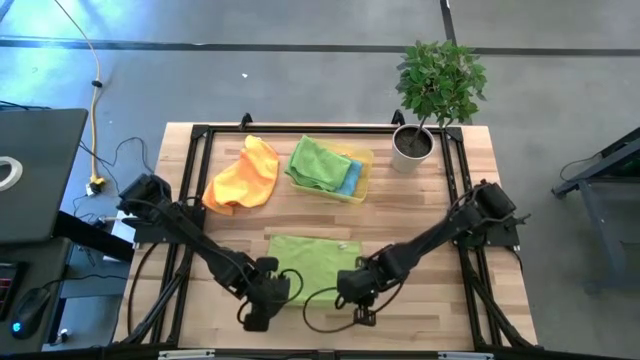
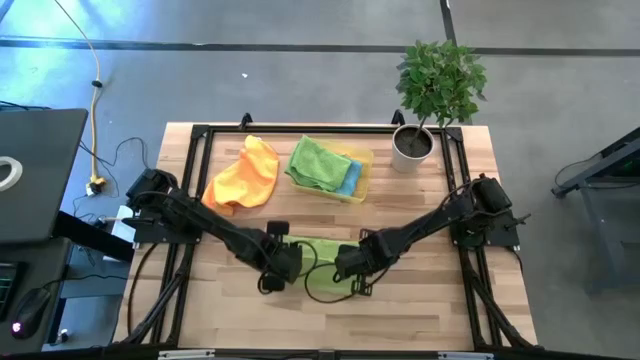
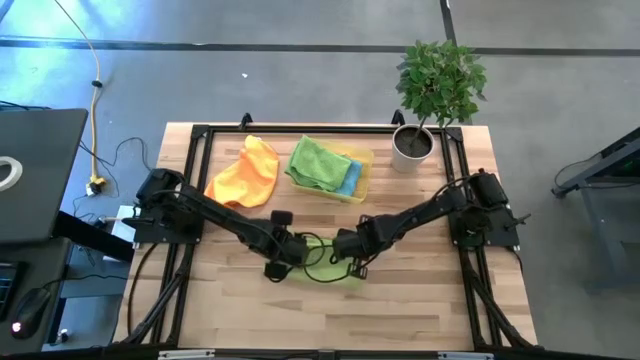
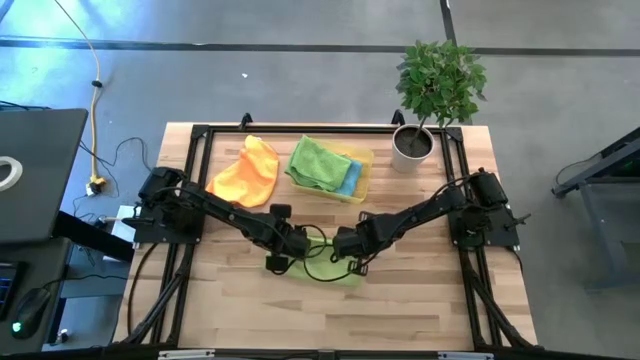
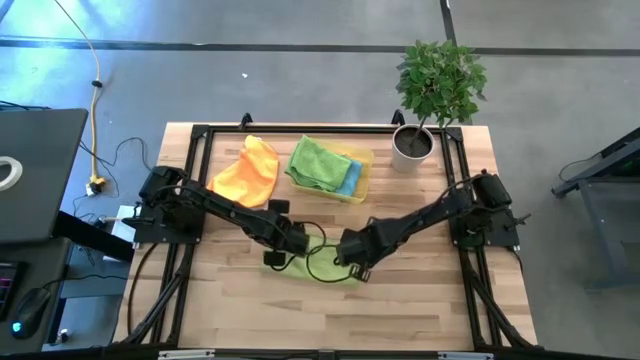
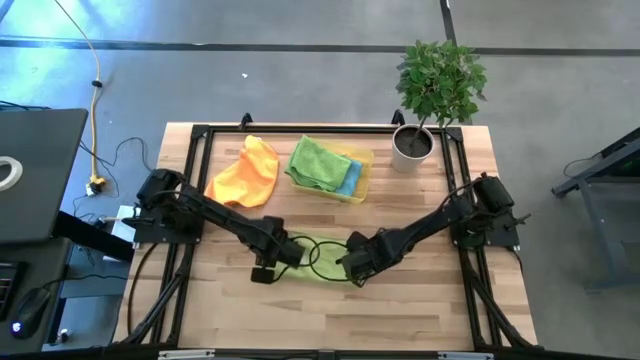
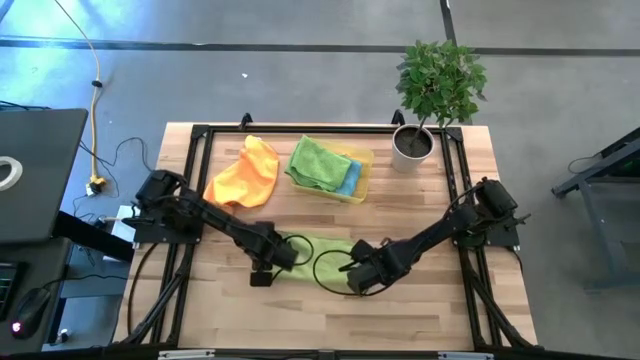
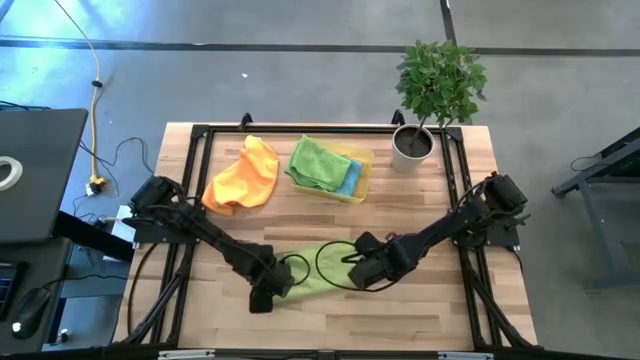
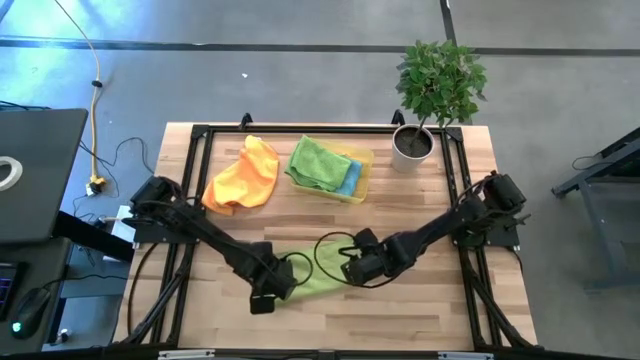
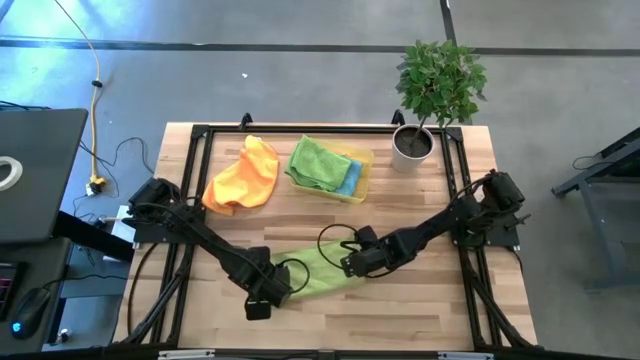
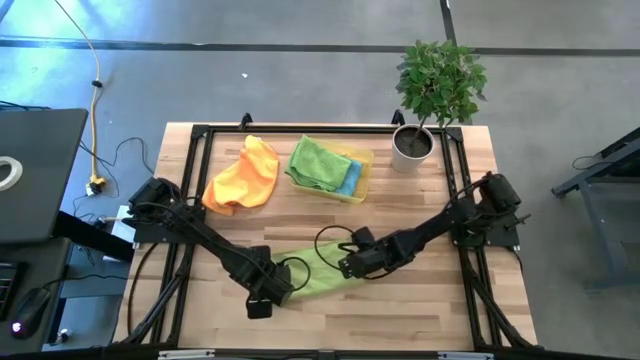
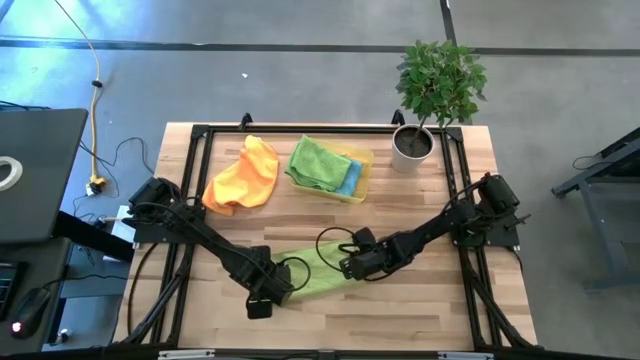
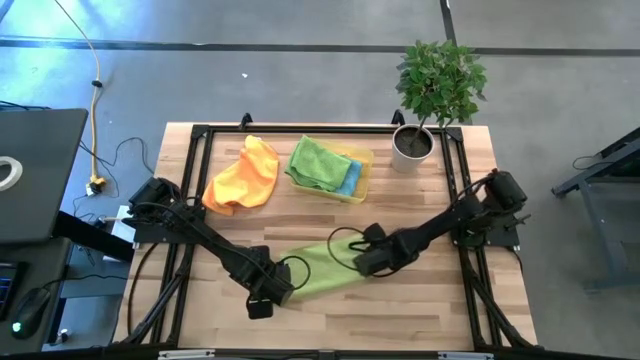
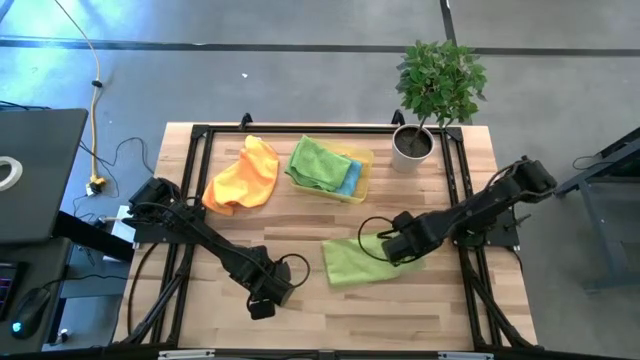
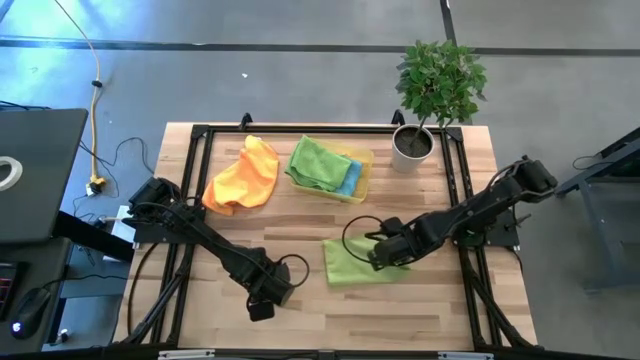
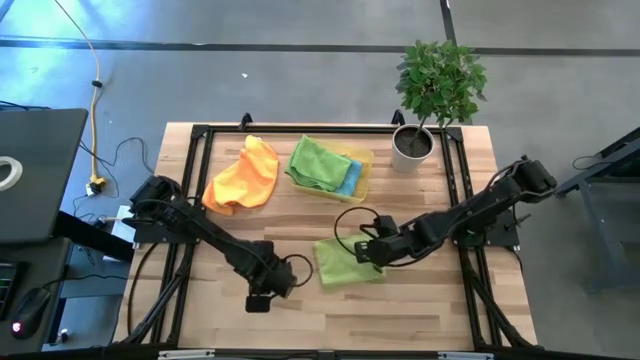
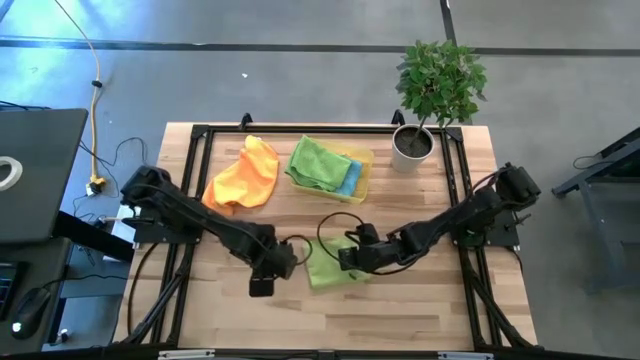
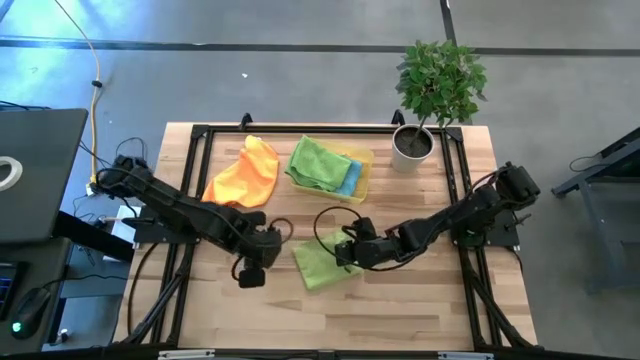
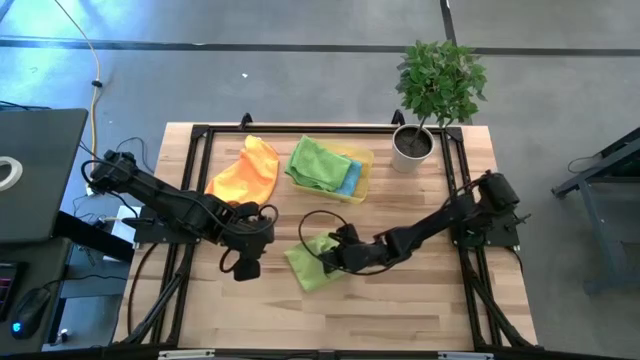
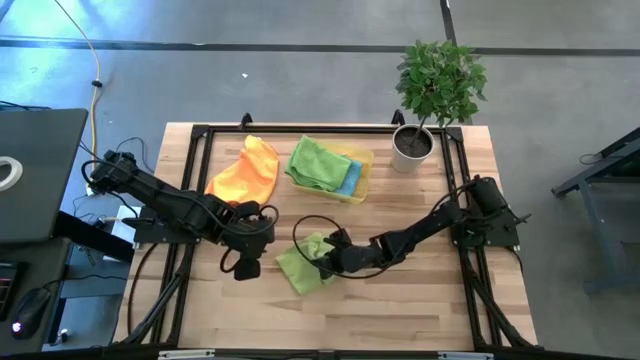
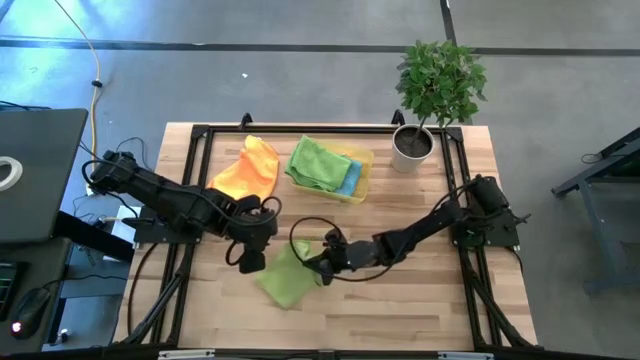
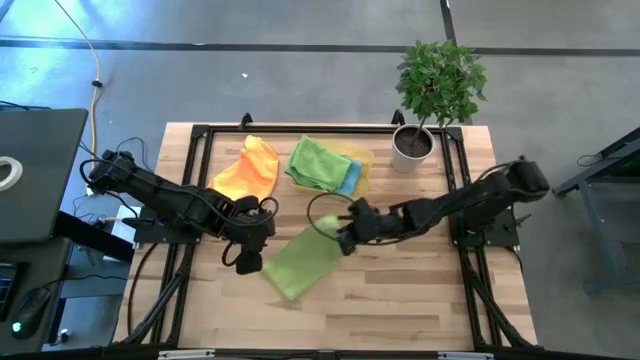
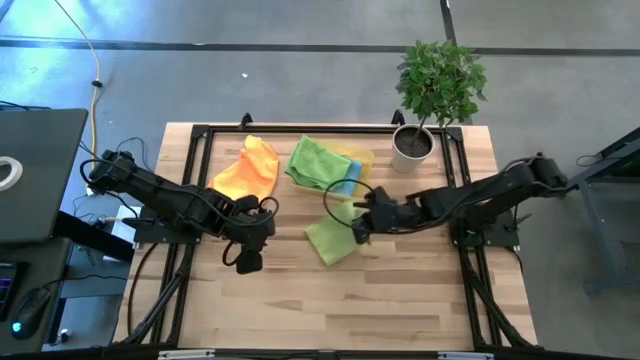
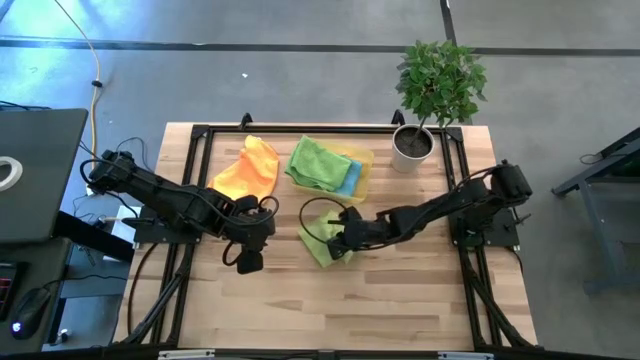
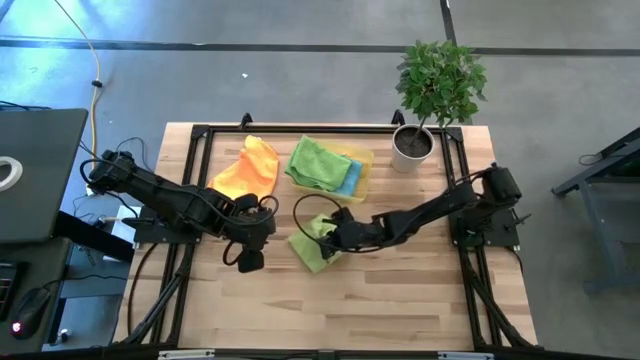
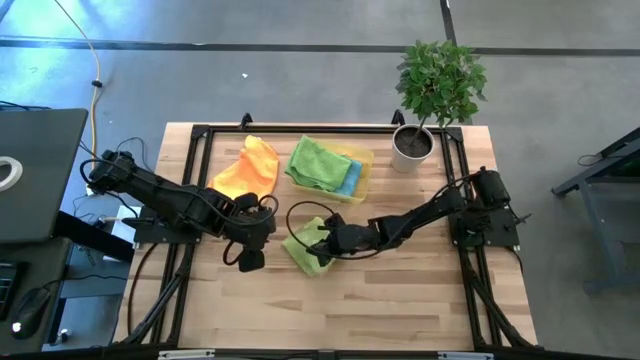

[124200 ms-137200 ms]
Task: Fold microfiber towels
Fold the light green microfiber towel

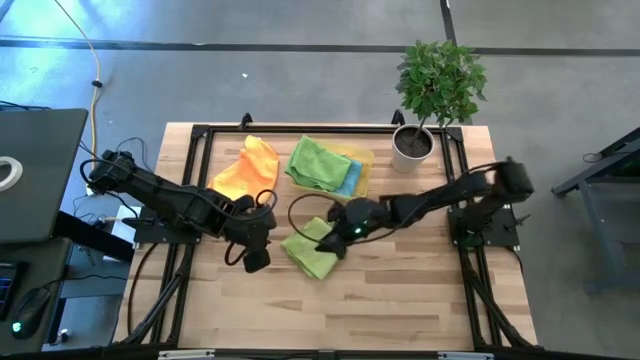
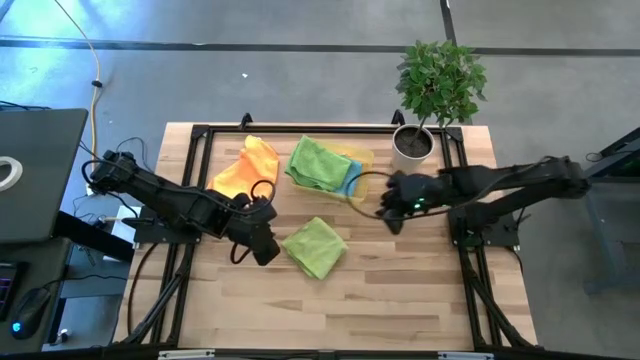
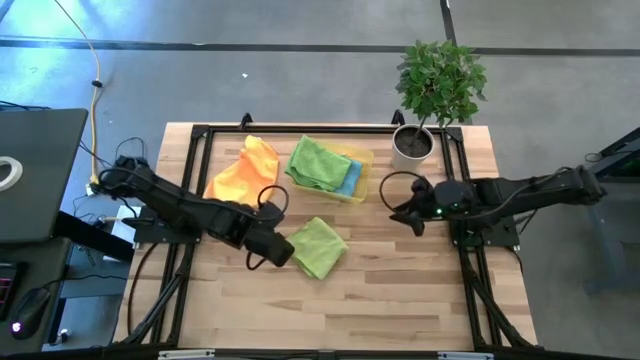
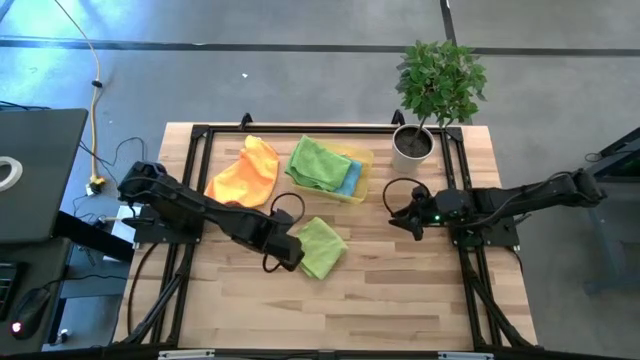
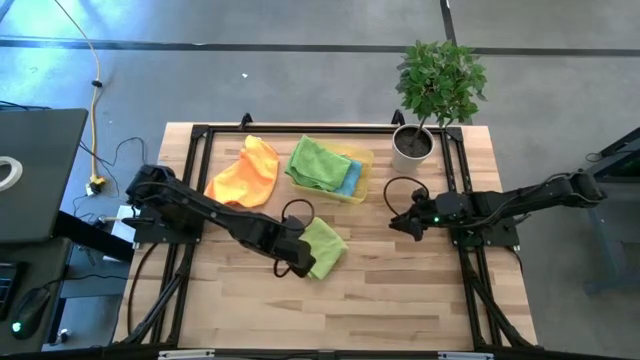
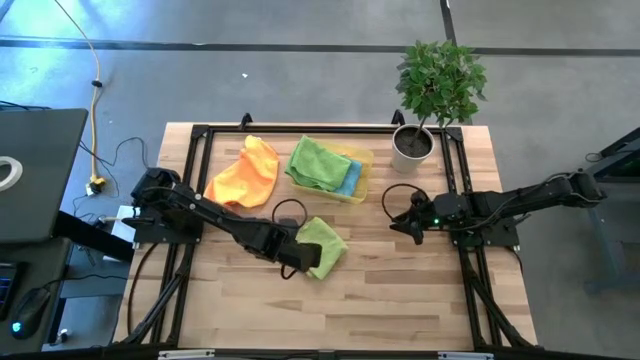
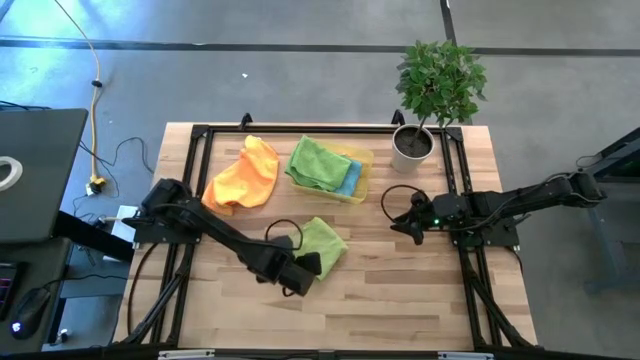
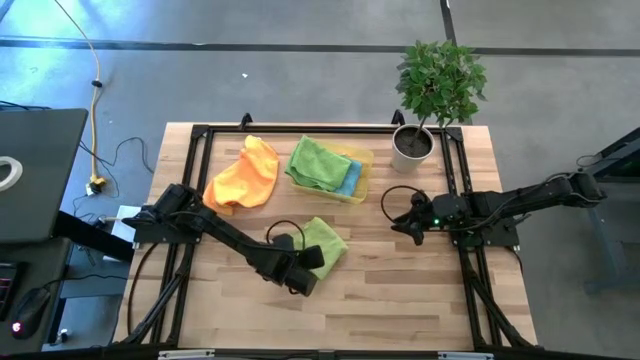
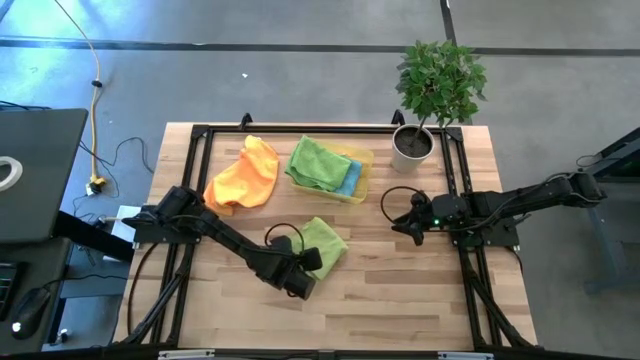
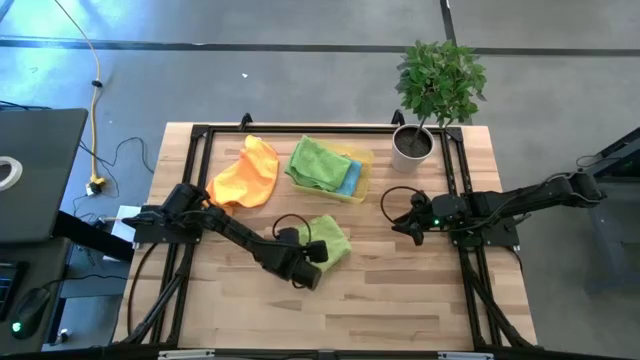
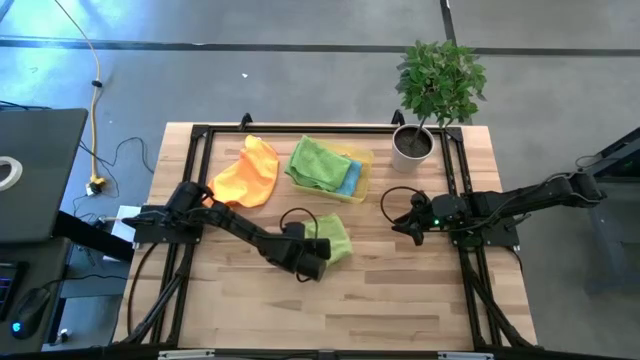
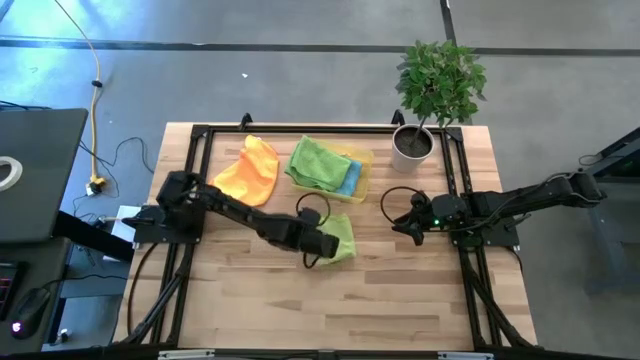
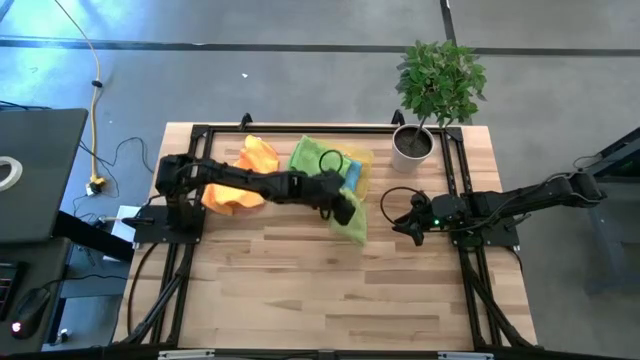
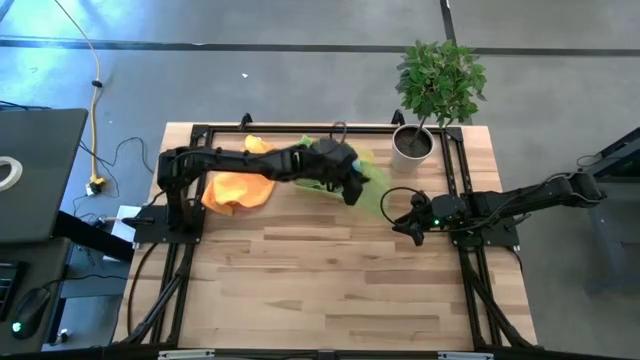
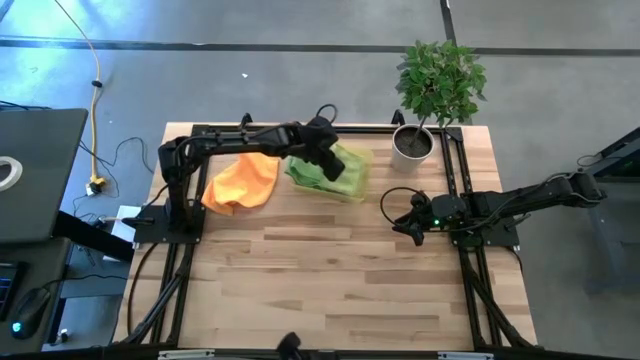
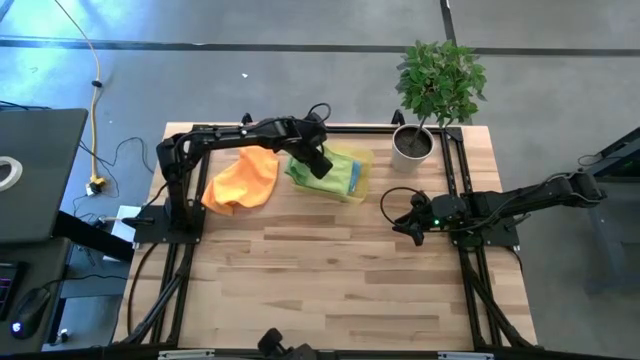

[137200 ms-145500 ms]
Put the folded light green microfiber towel into the yellow bin
